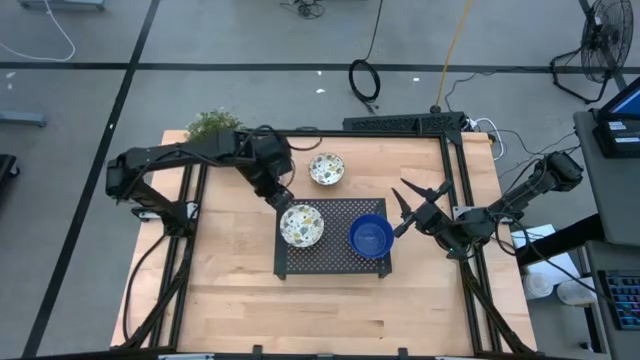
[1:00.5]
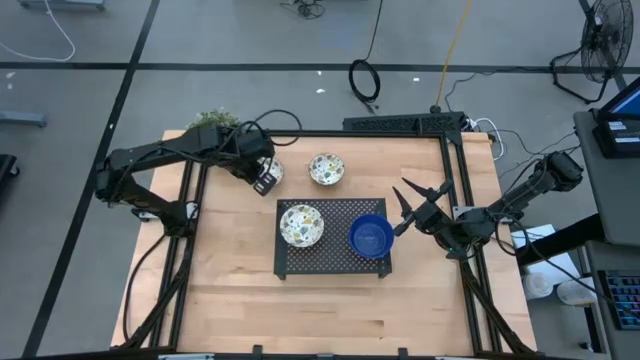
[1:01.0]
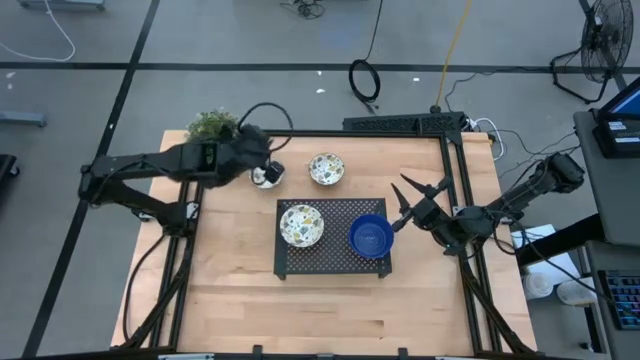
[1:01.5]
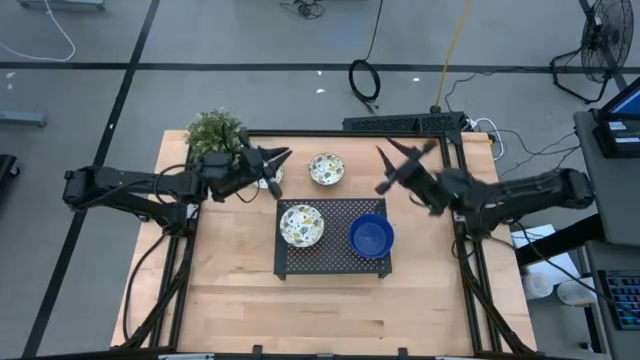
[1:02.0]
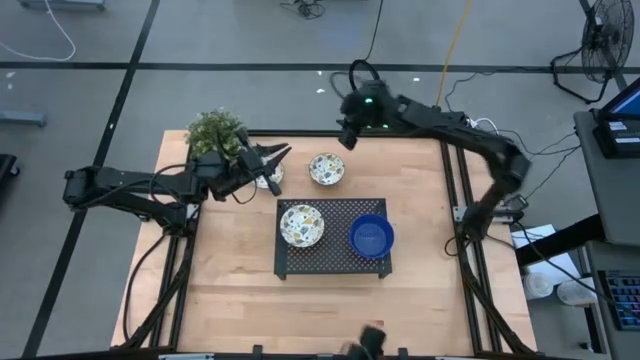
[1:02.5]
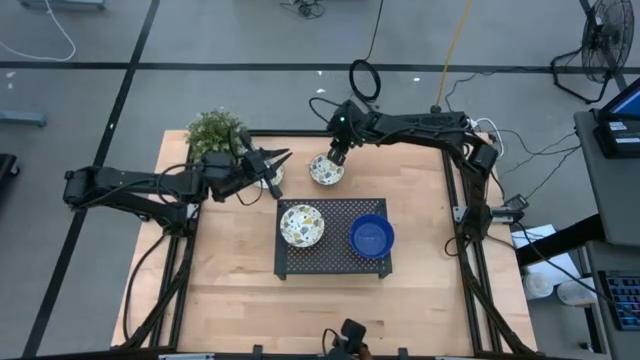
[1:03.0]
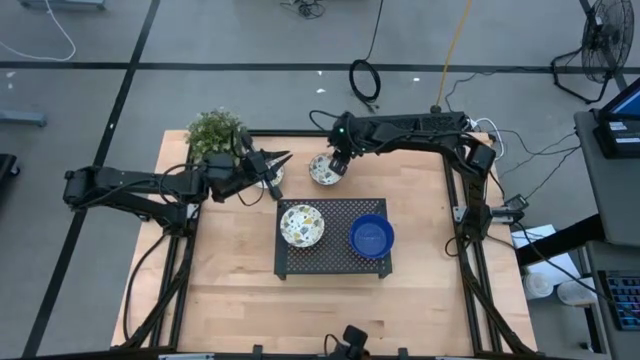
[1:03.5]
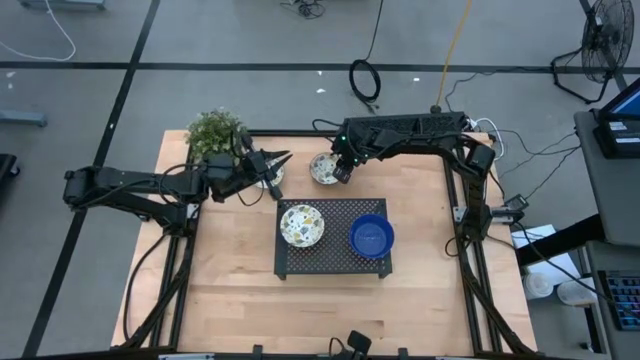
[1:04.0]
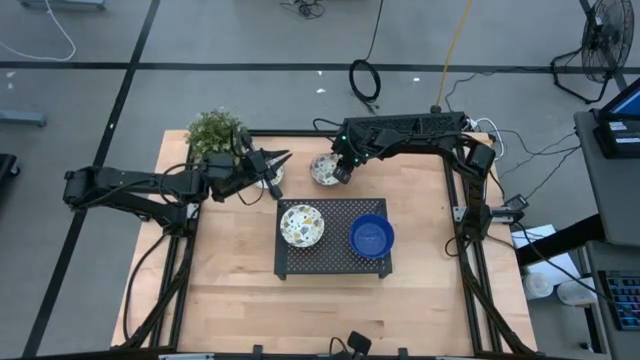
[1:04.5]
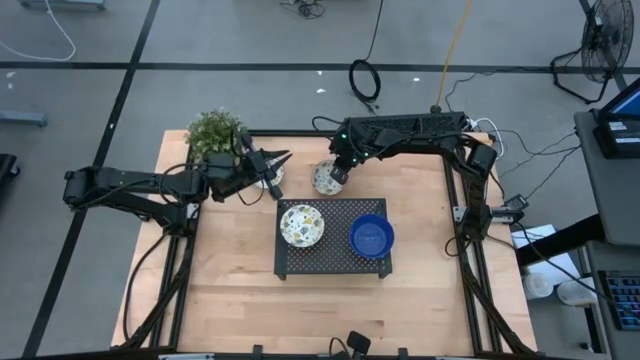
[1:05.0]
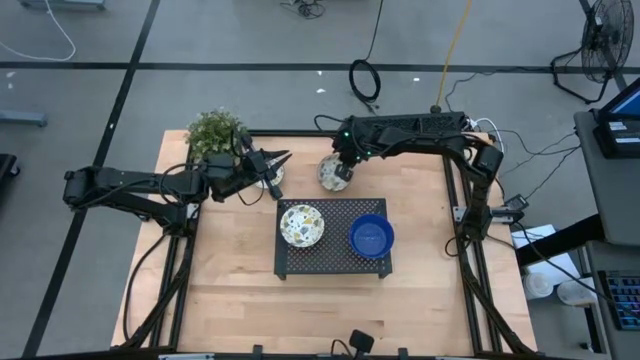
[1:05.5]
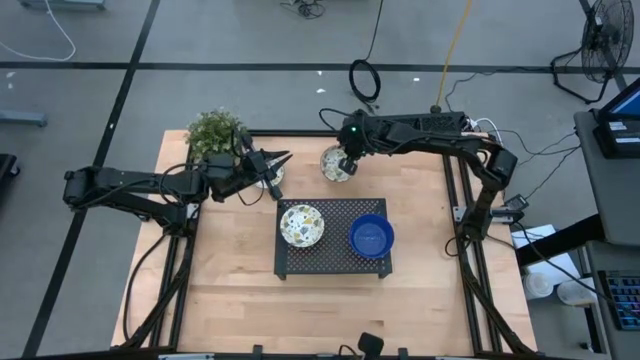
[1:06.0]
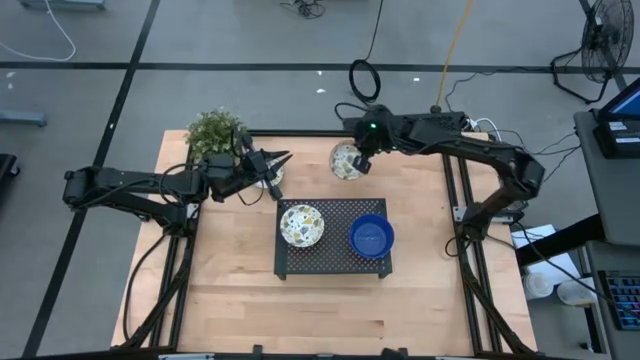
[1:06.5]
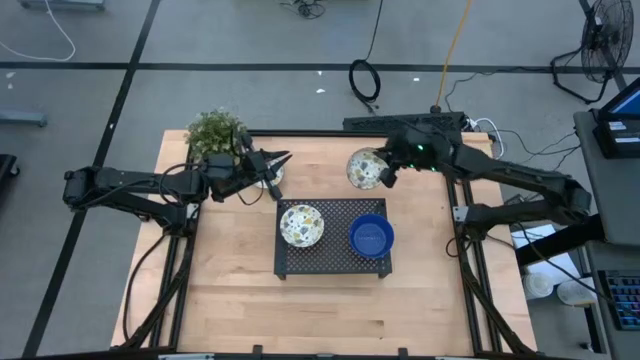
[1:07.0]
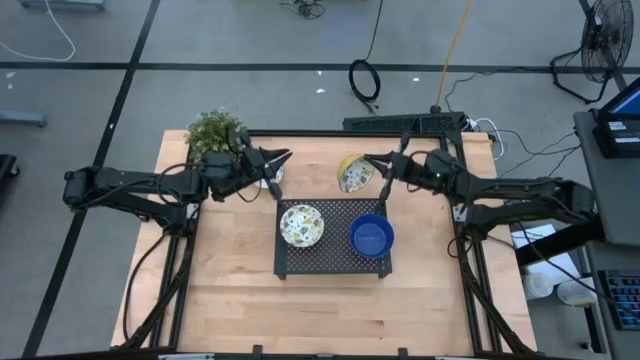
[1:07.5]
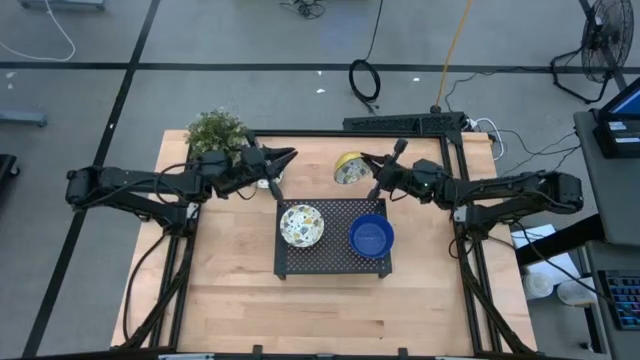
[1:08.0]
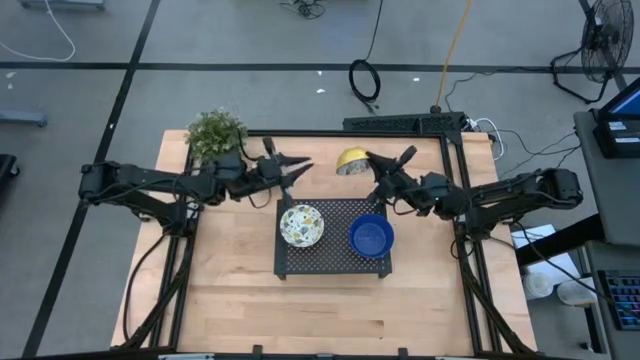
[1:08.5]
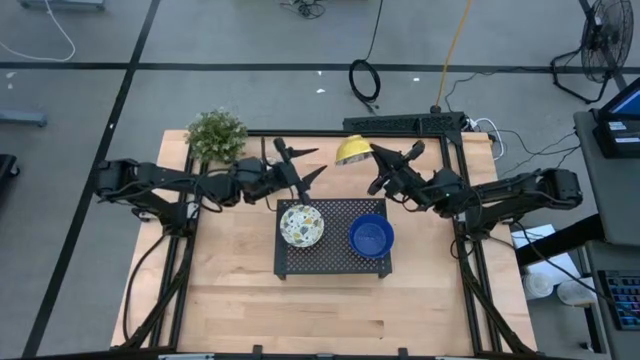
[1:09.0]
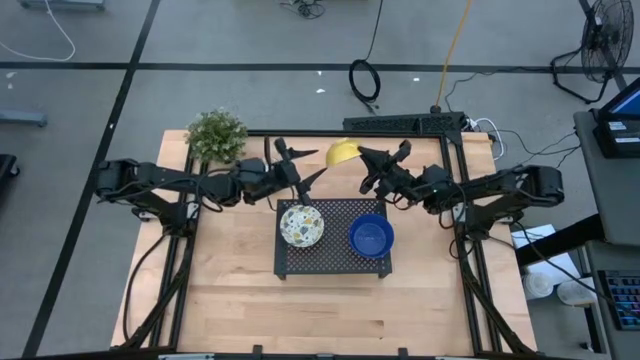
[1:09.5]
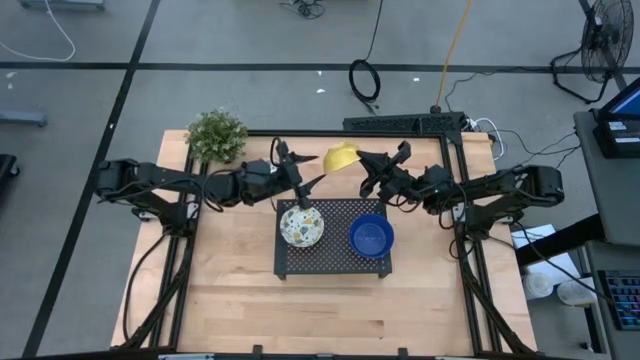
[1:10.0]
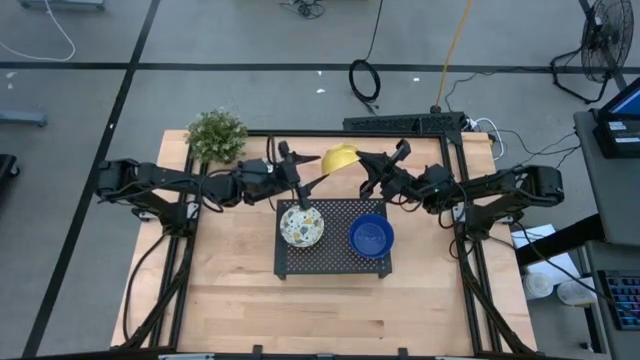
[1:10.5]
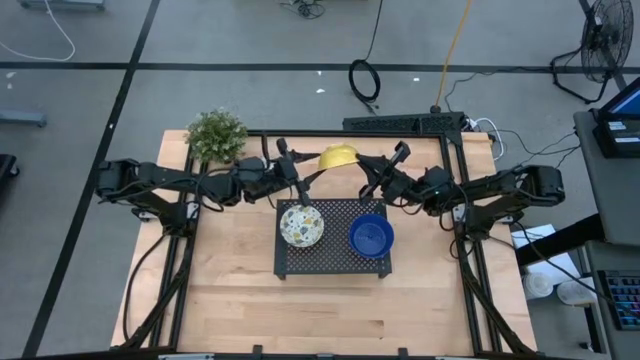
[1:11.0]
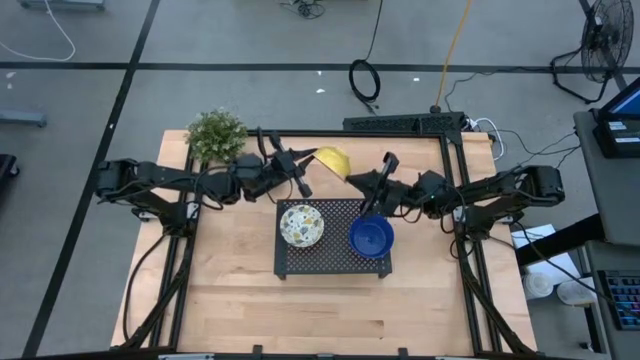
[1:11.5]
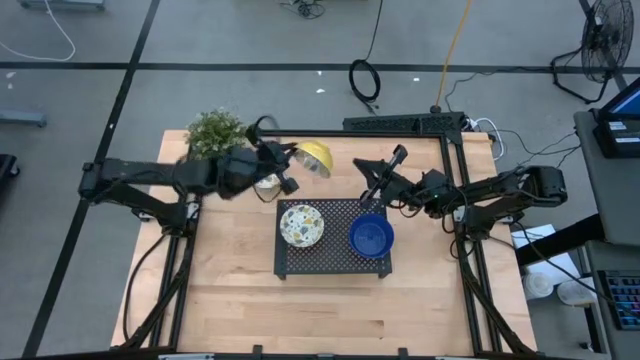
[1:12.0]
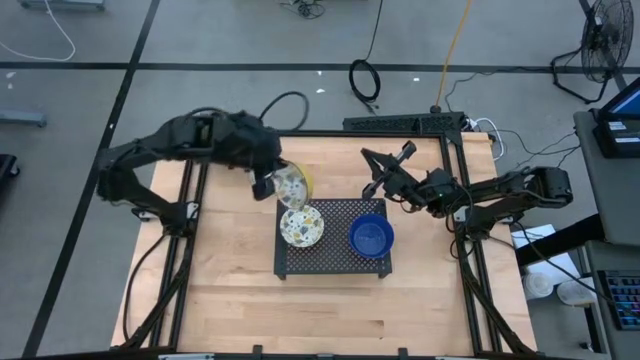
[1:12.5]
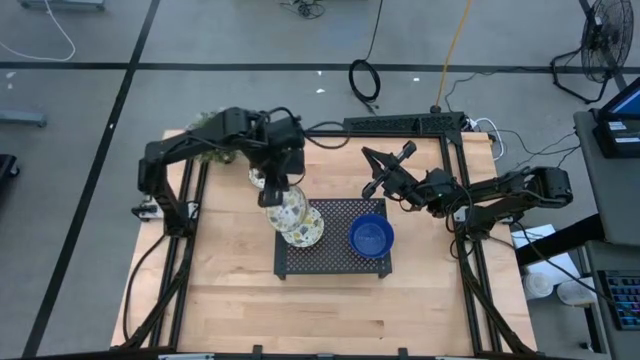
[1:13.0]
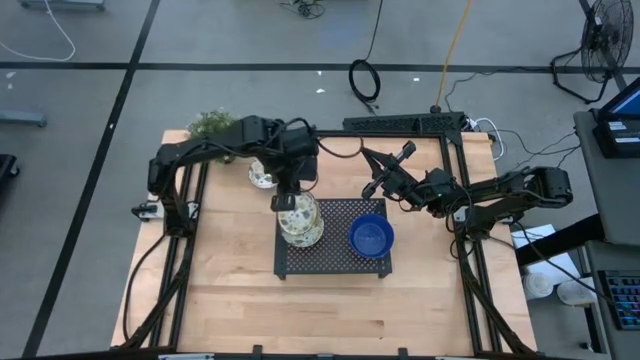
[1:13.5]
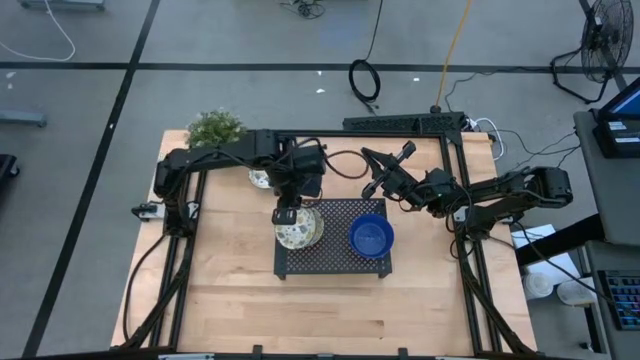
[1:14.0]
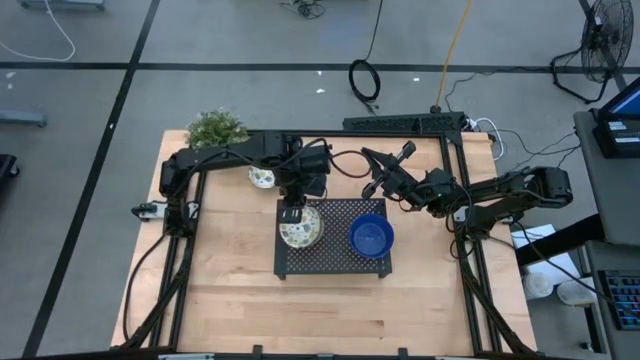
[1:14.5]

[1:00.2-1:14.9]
Task: Pick & Place Mini bowls
Stack the right white bowl on the white bowl on the shelf

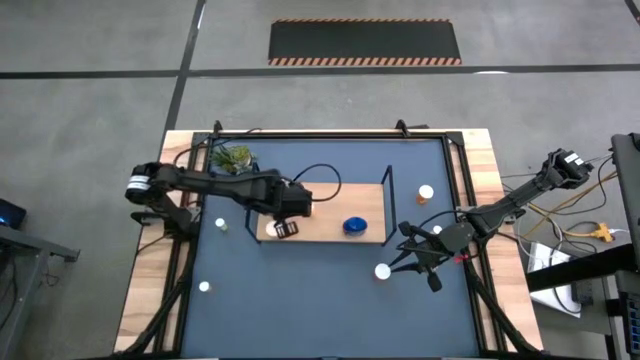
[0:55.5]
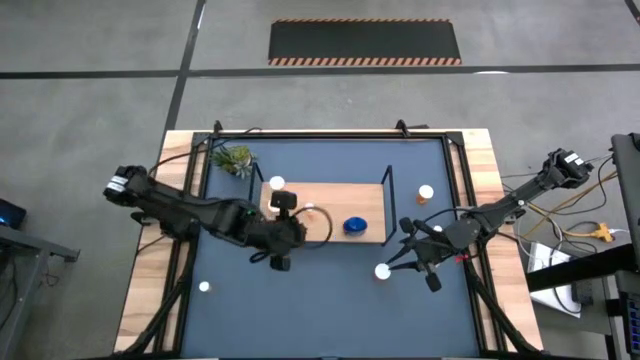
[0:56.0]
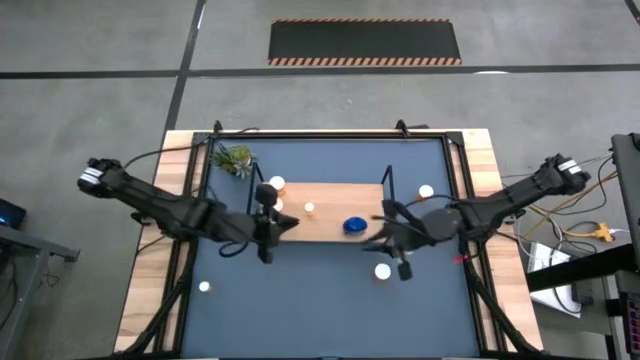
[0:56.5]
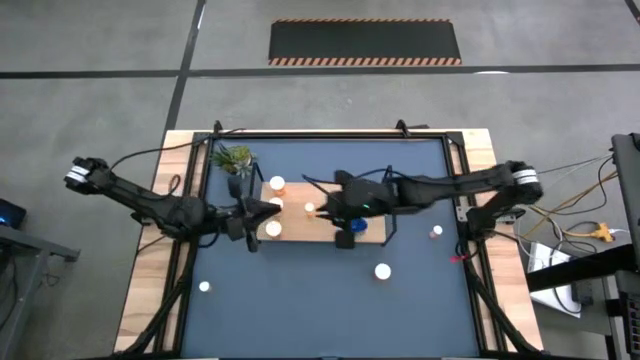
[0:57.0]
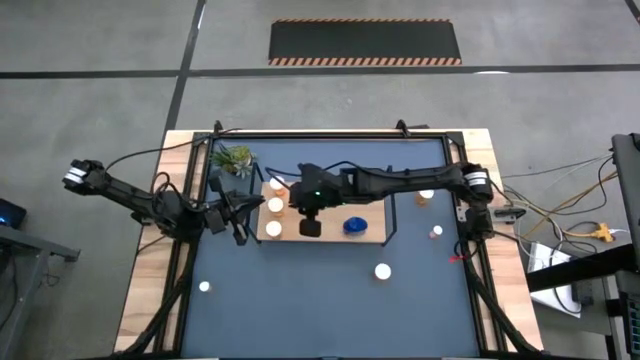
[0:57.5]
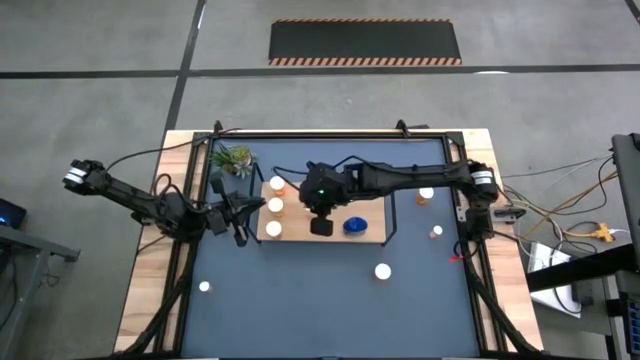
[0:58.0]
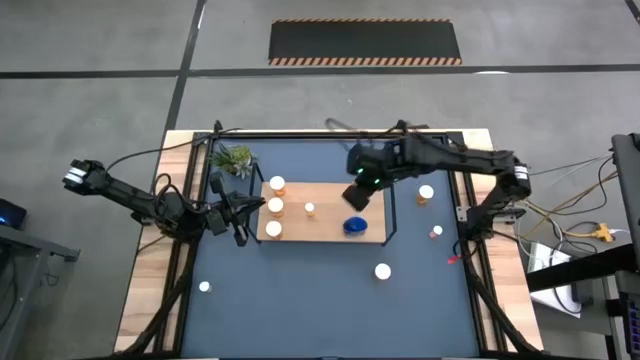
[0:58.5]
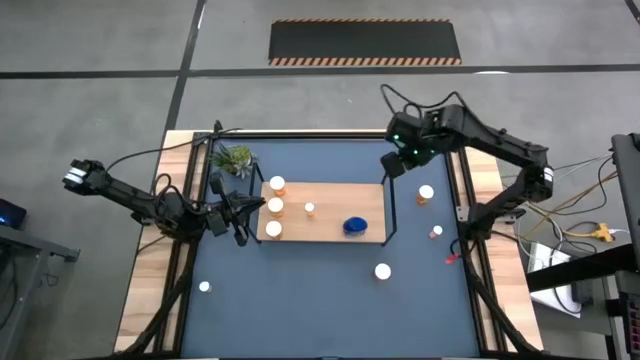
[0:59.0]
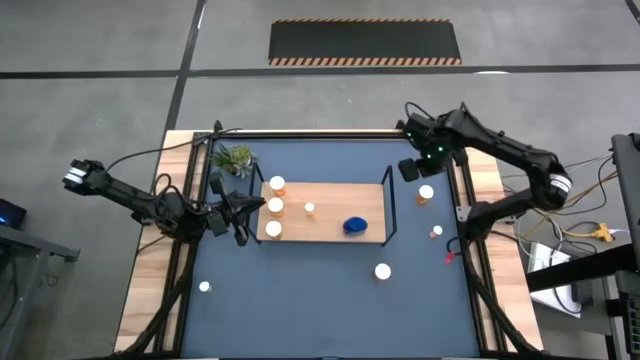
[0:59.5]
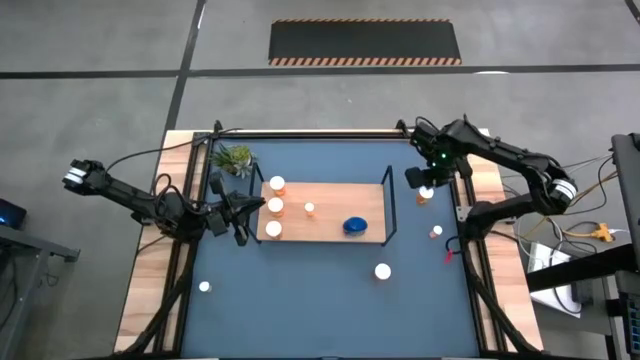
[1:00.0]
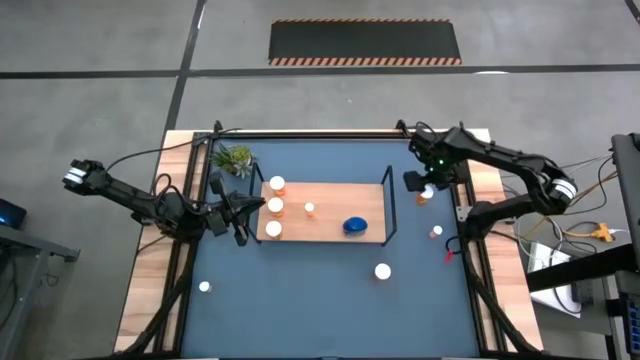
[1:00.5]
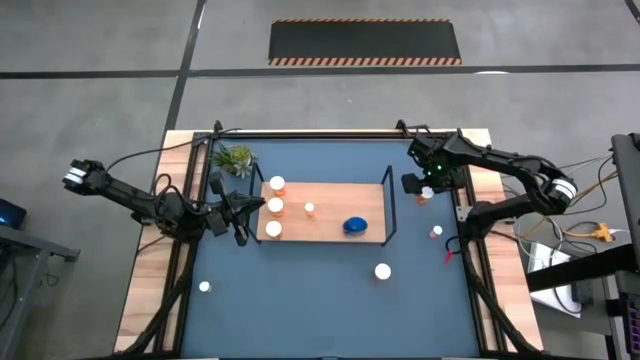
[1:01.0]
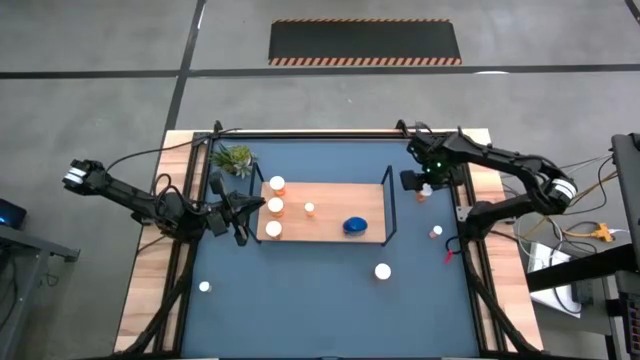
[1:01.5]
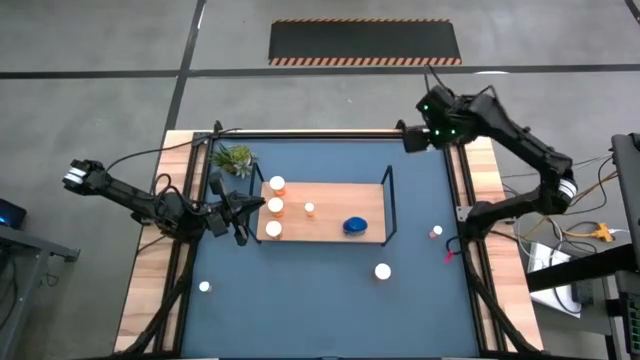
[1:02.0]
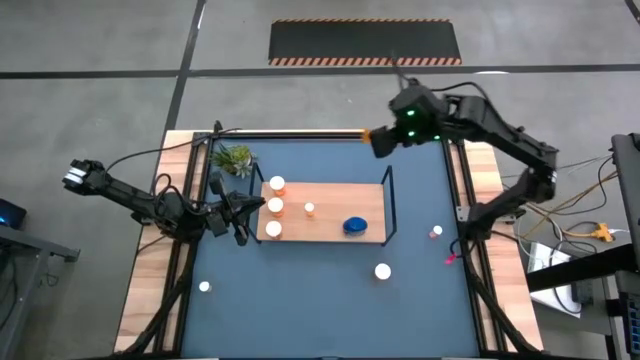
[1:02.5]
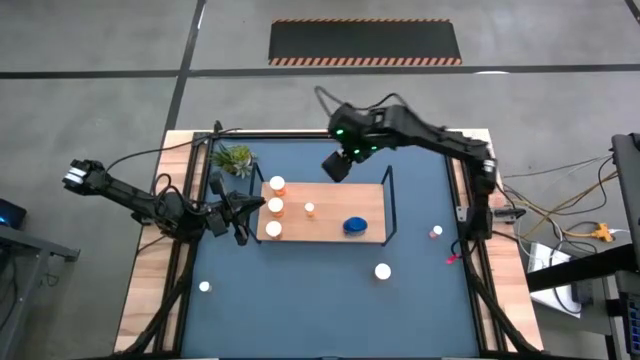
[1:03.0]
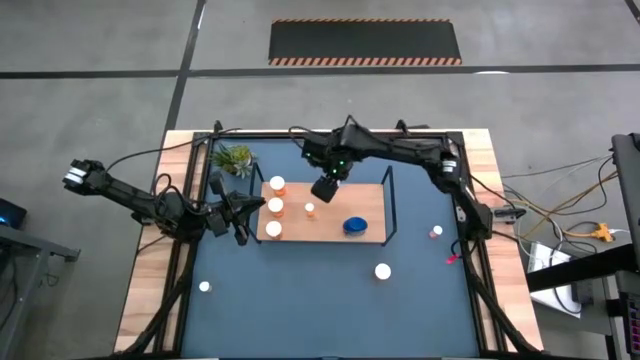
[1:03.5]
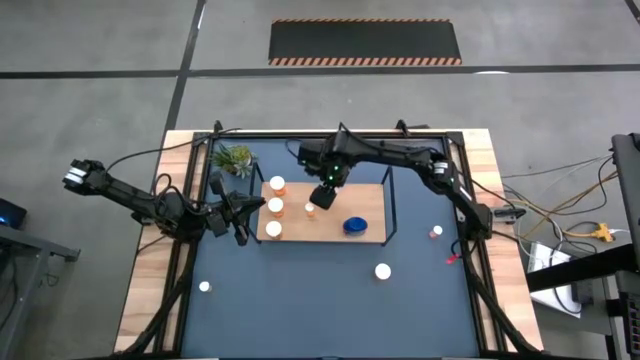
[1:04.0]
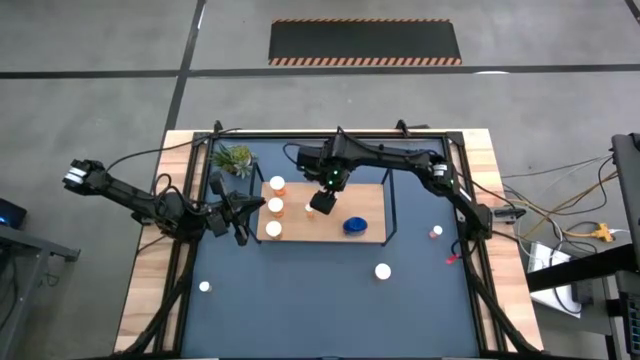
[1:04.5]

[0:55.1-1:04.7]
Task: Pick and place medicine bottles onto shelf by color
Put the big orange pill bottle on to the shelf
